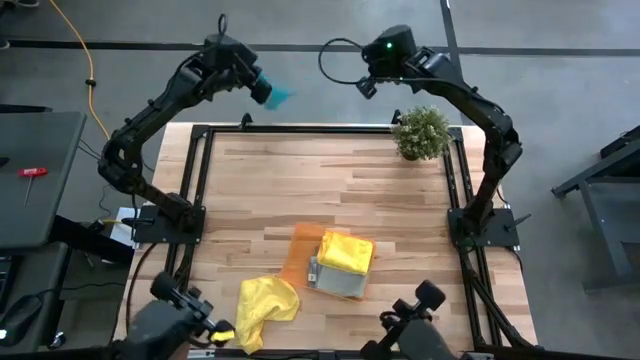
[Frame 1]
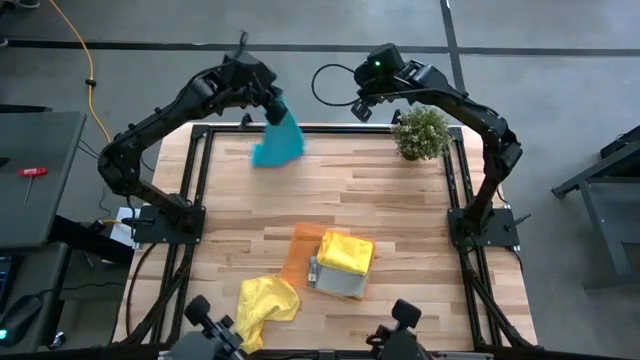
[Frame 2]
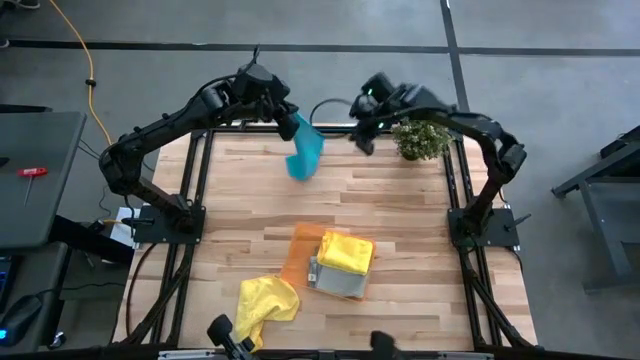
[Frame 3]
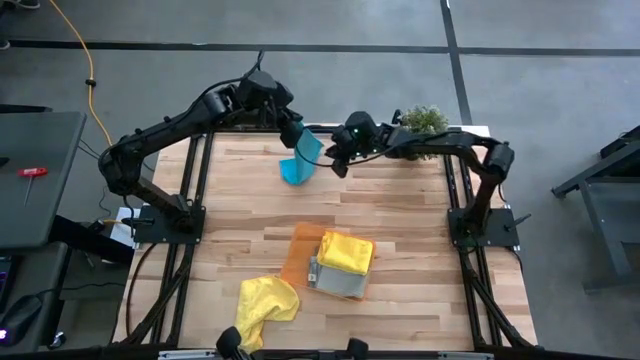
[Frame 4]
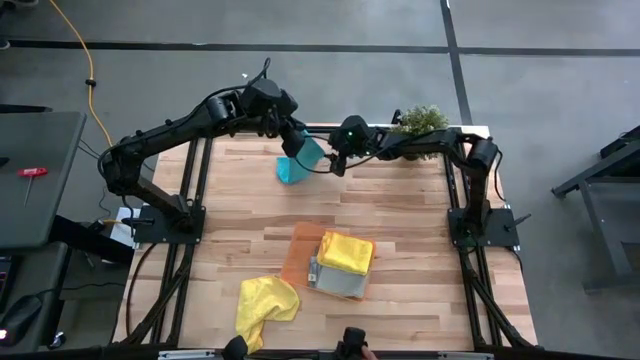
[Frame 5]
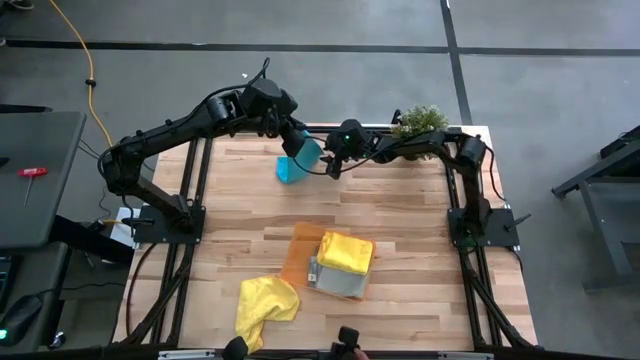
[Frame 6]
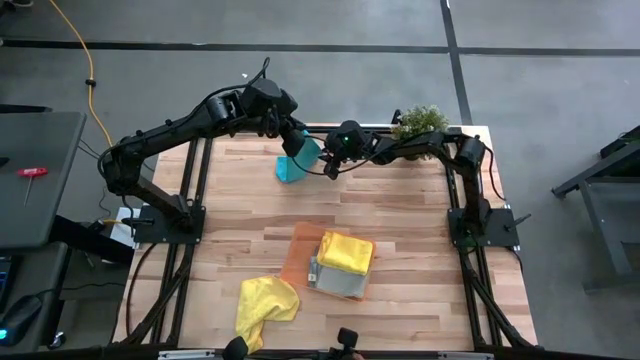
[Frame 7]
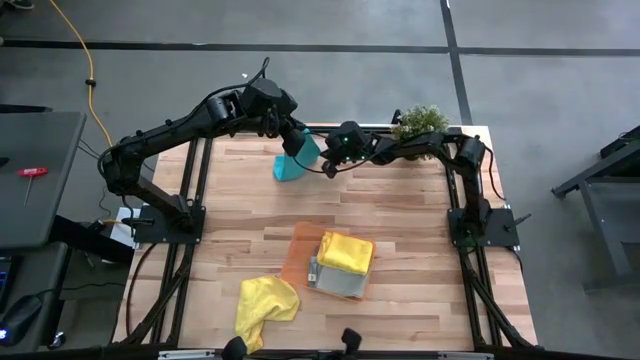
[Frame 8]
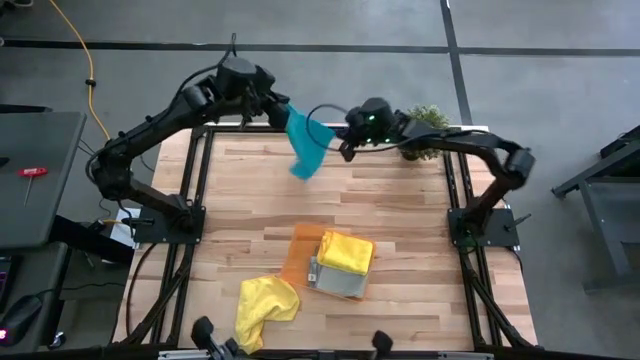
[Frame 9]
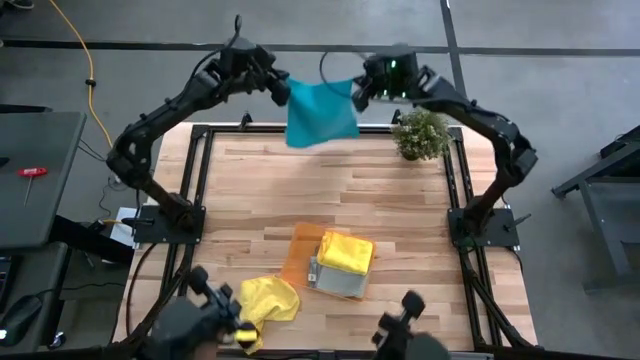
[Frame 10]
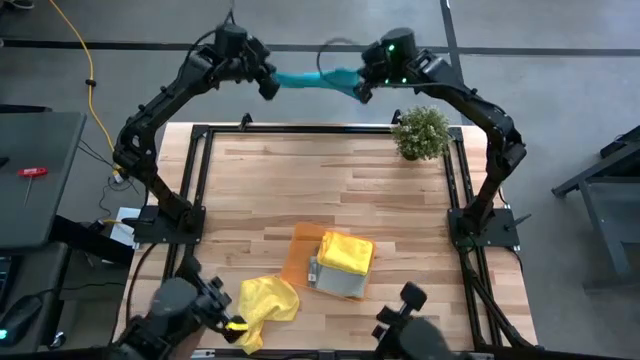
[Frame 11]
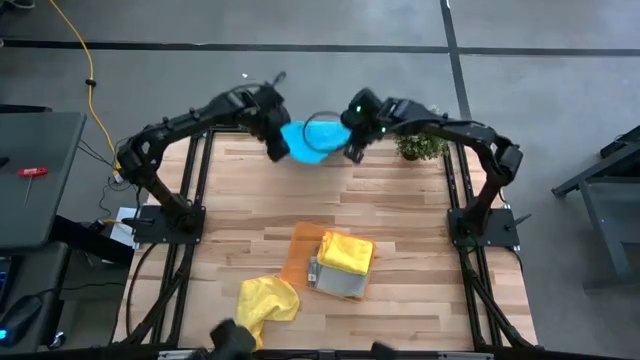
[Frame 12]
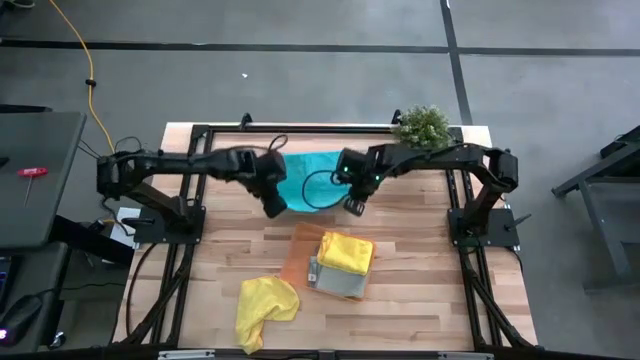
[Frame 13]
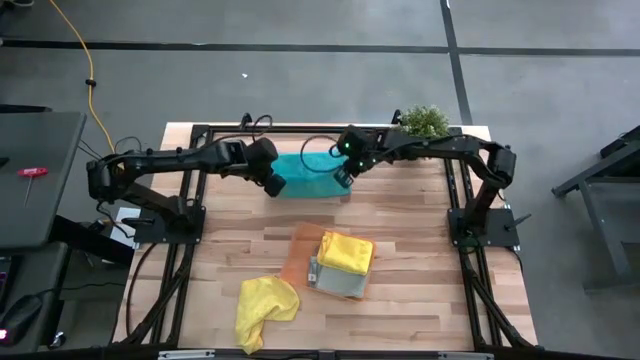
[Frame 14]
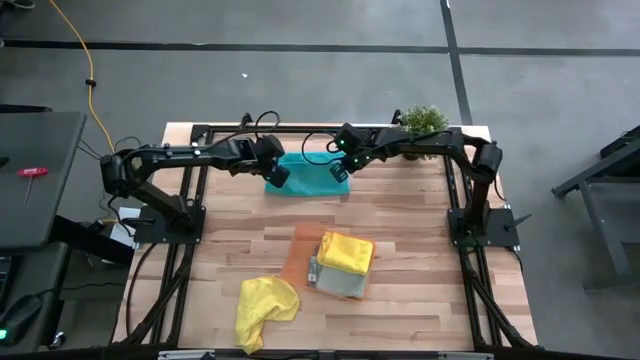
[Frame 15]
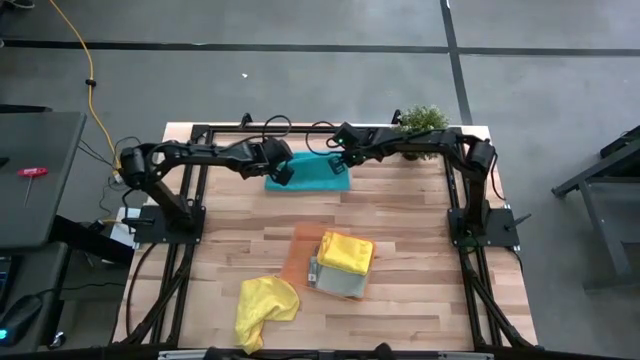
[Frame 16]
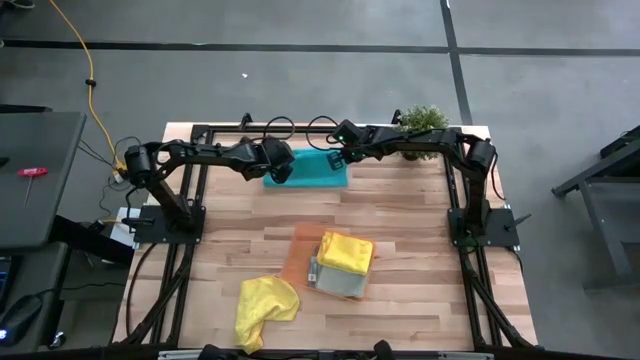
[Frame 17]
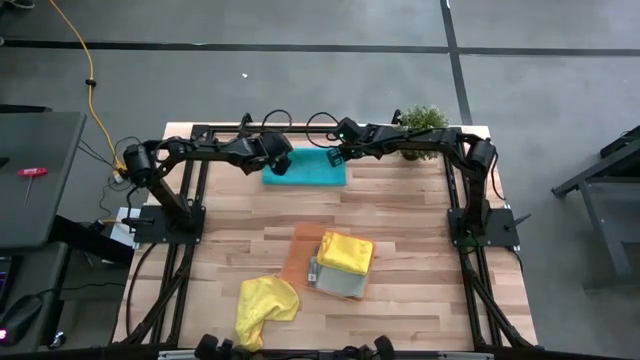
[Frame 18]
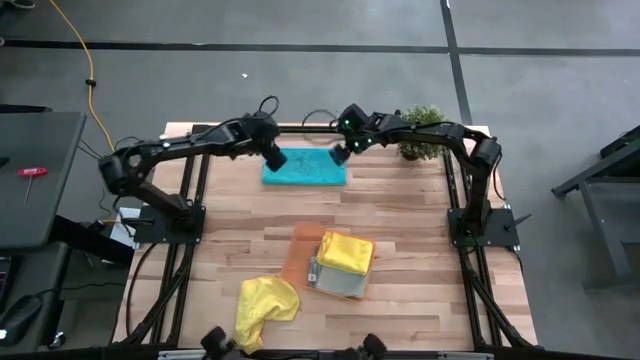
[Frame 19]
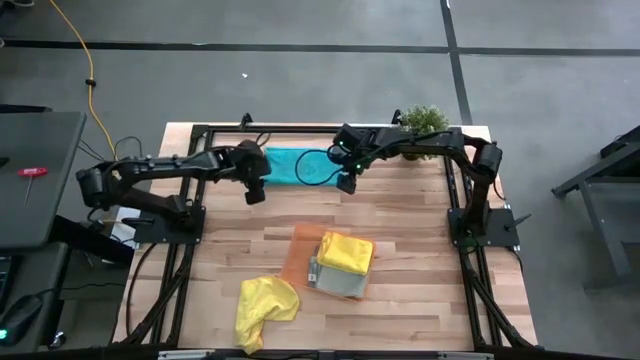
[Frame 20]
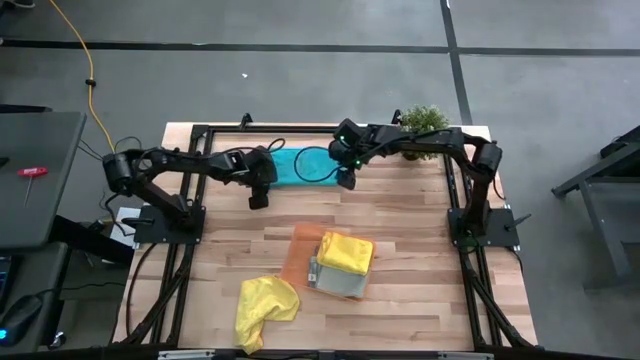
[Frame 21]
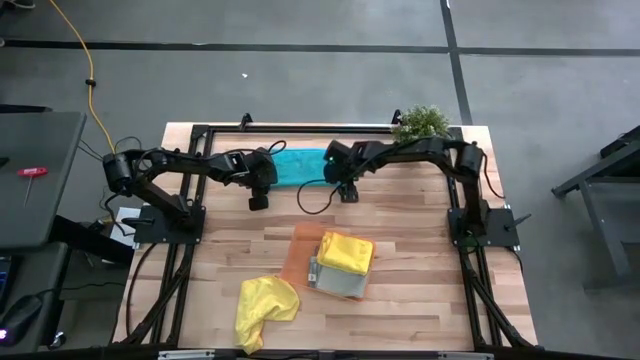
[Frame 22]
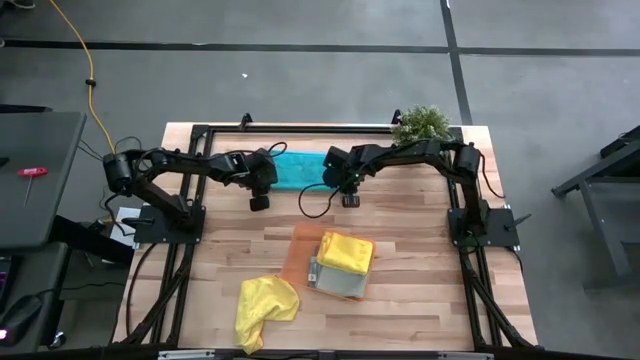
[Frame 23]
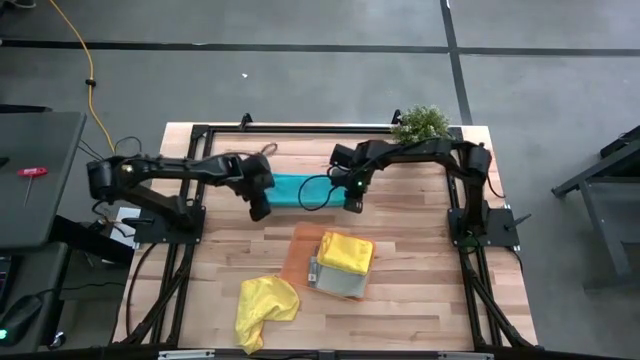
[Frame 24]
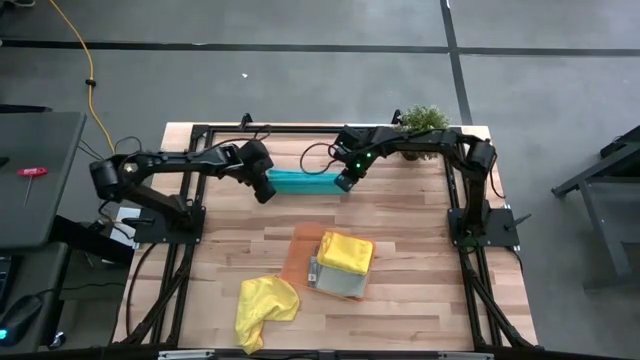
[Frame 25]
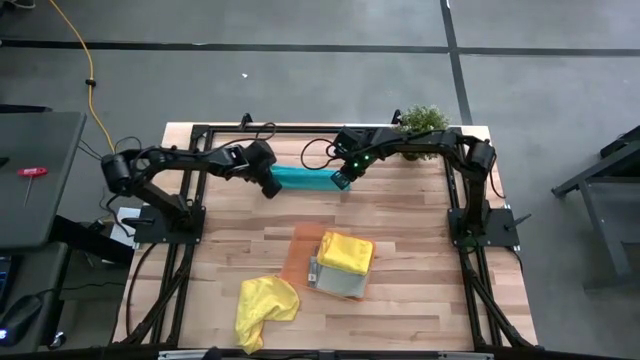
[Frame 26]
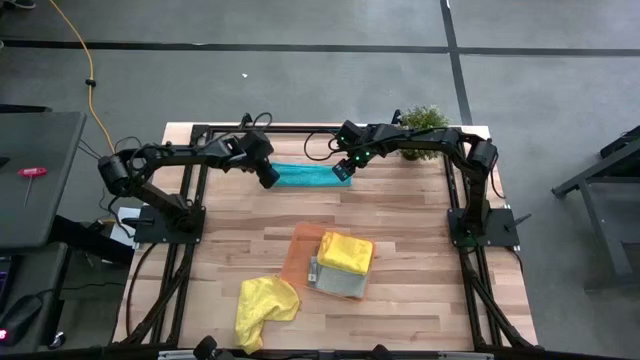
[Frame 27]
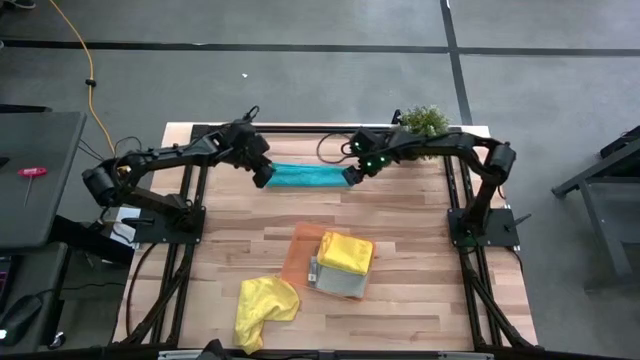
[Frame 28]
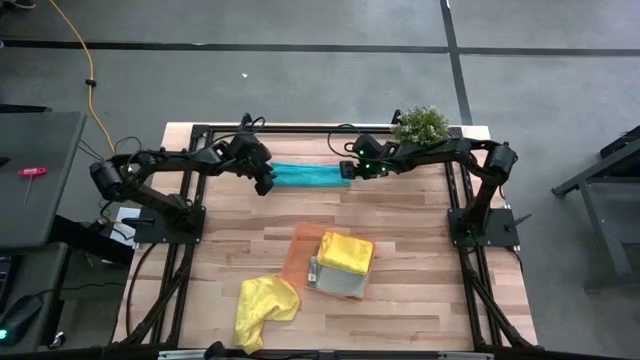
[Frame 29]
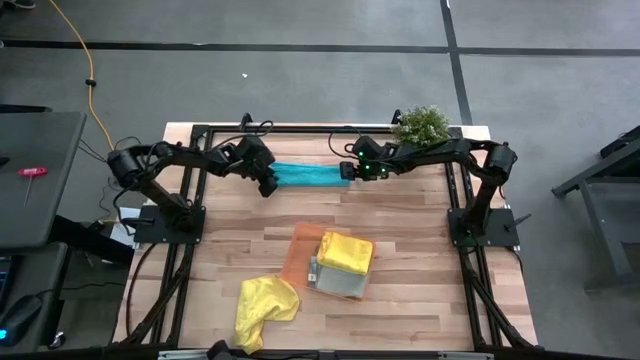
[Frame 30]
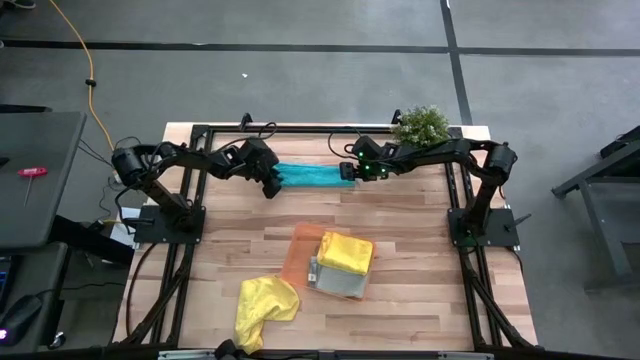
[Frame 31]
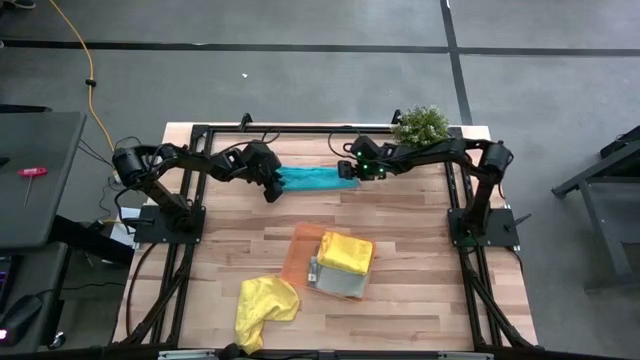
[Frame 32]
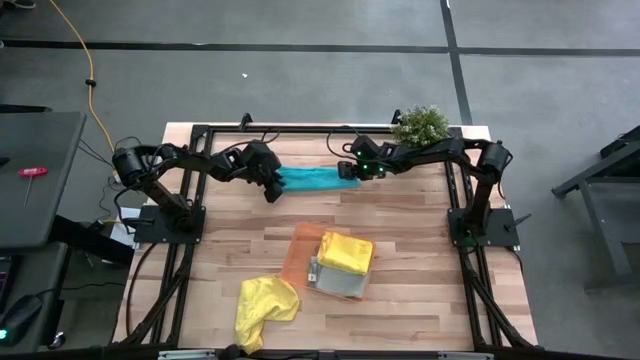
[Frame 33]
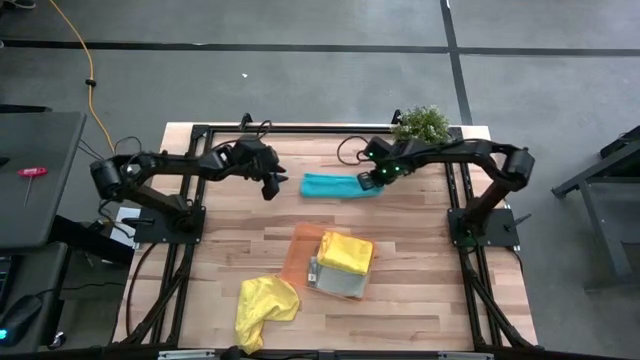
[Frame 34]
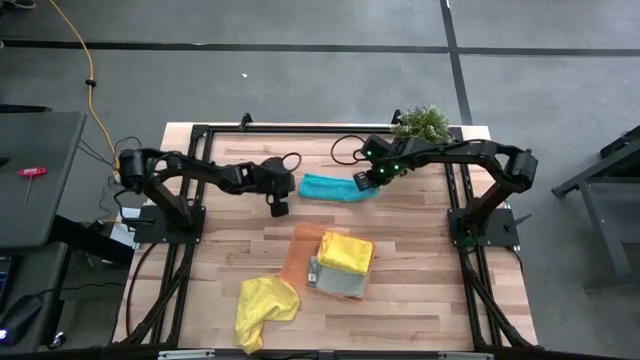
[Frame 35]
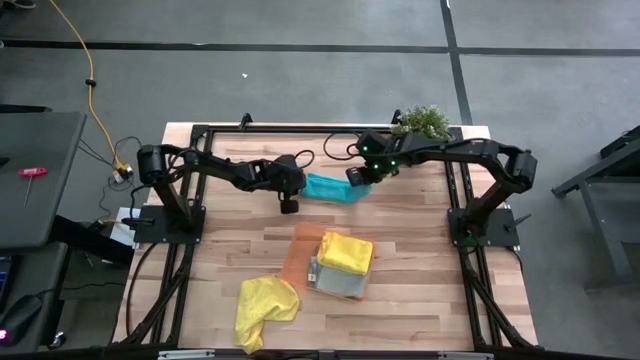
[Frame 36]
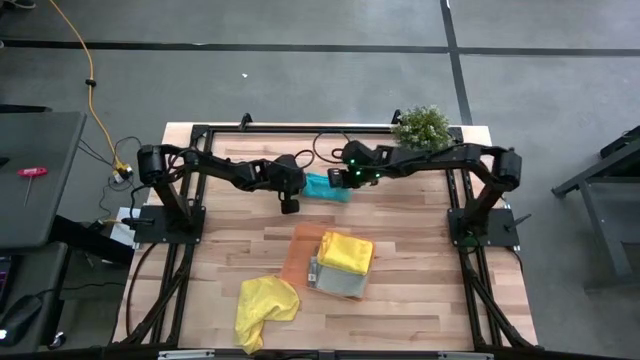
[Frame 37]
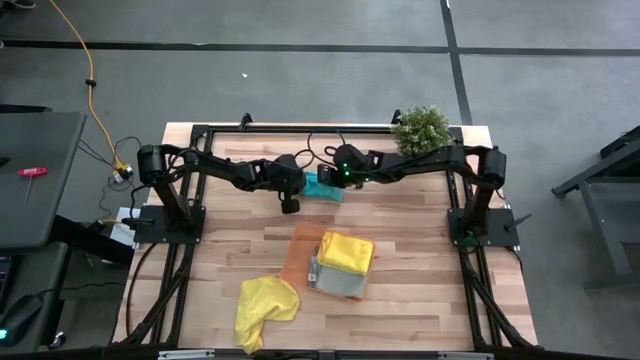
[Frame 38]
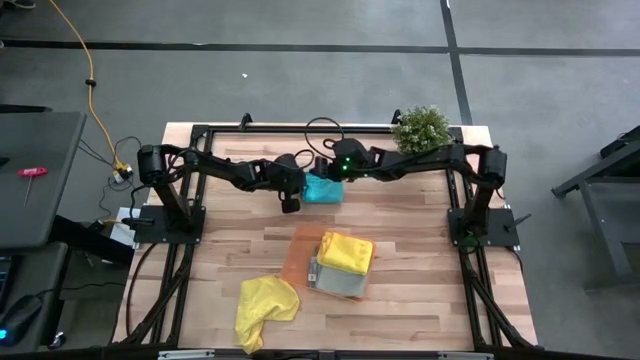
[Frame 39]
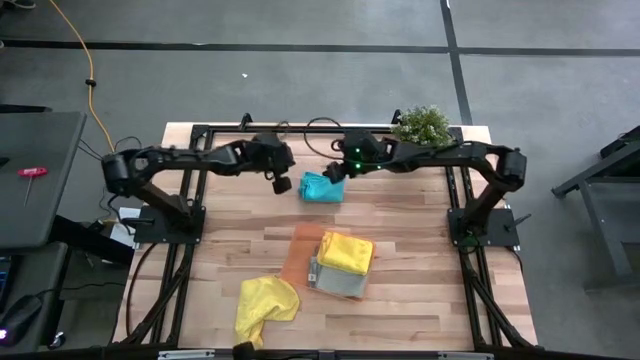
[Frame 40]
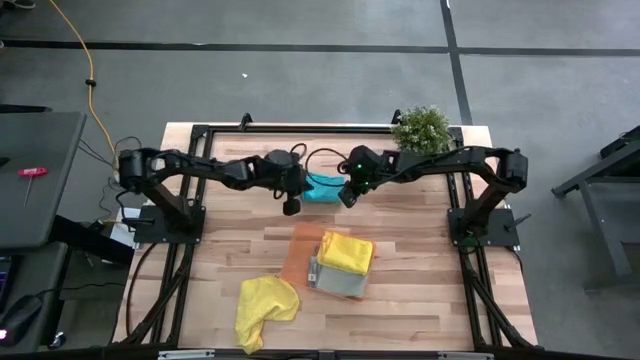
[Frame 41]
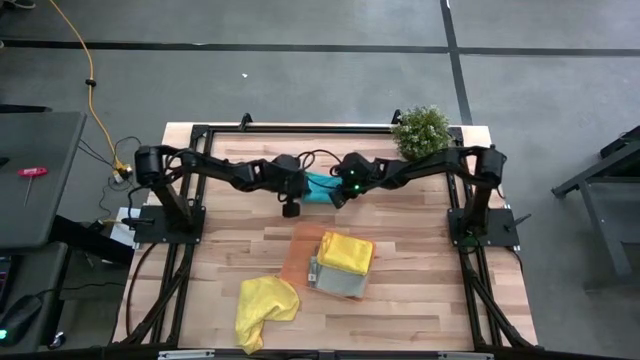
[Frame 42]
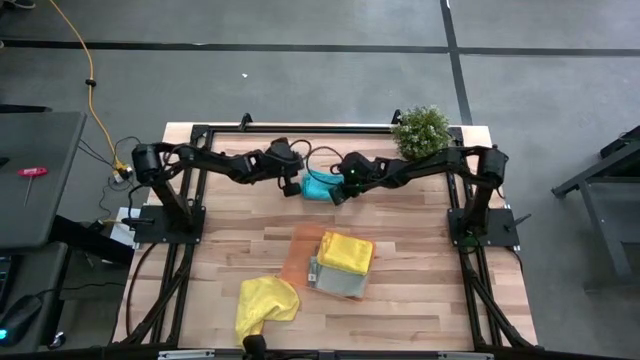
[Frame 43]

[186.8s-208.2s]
Task: Fold microfiber towels
Fold the blue towel
